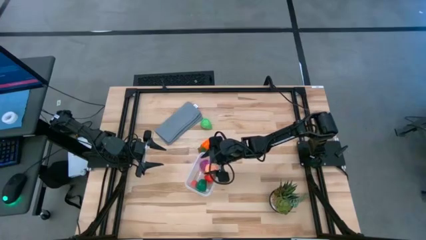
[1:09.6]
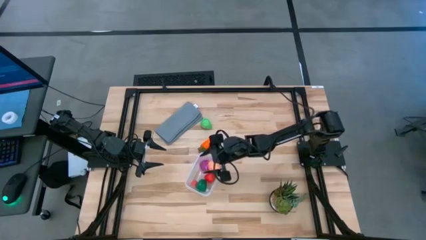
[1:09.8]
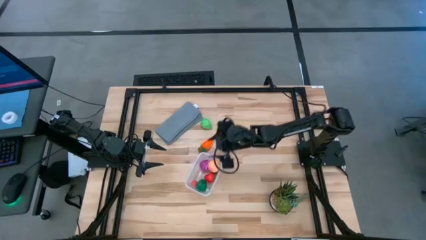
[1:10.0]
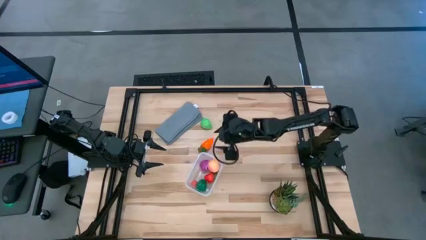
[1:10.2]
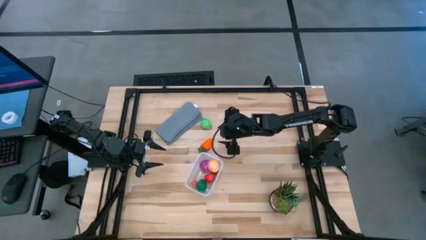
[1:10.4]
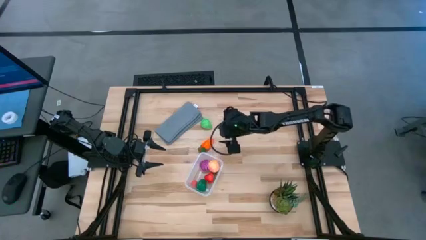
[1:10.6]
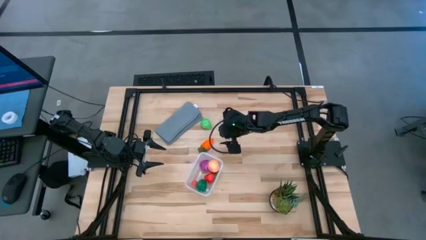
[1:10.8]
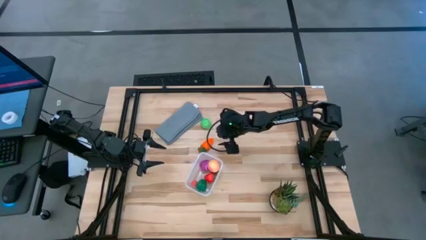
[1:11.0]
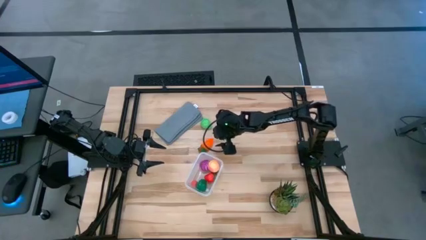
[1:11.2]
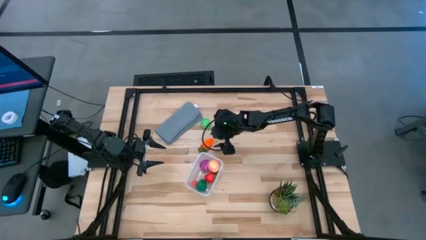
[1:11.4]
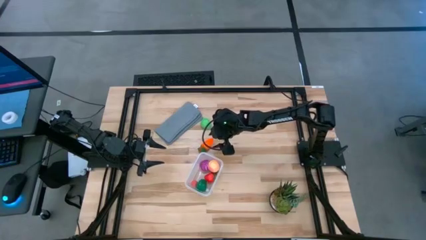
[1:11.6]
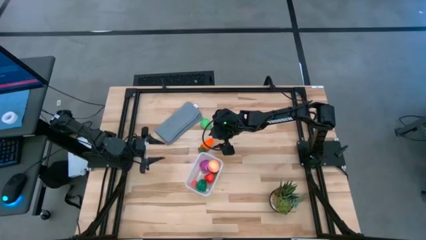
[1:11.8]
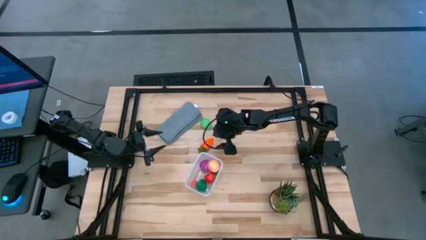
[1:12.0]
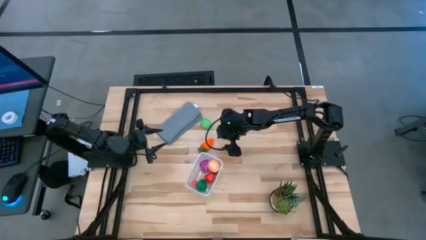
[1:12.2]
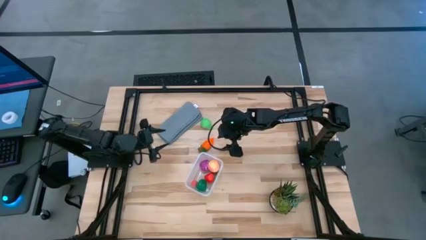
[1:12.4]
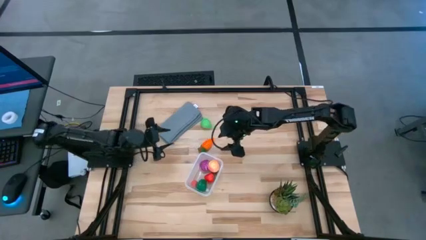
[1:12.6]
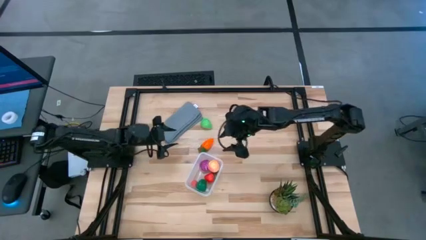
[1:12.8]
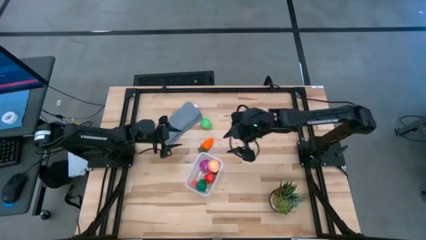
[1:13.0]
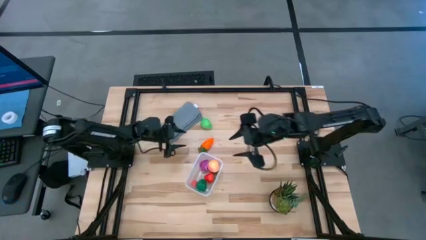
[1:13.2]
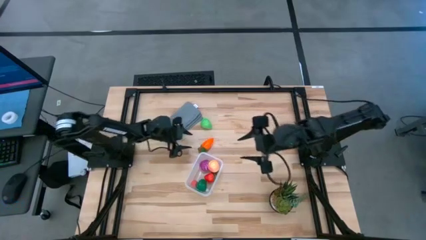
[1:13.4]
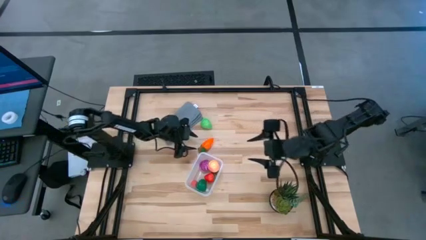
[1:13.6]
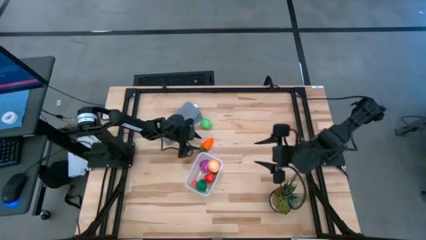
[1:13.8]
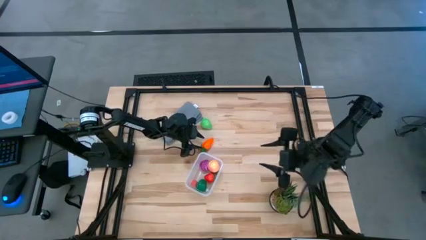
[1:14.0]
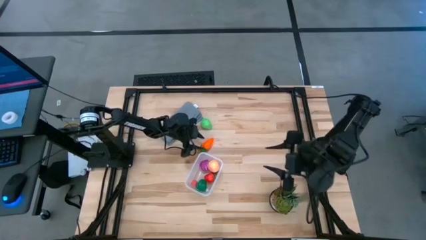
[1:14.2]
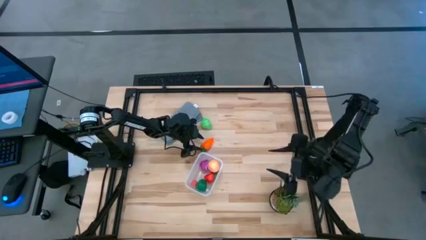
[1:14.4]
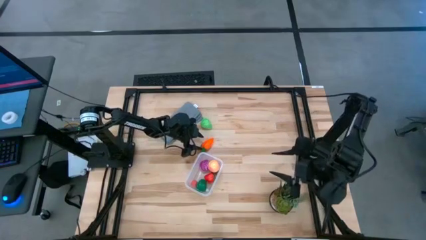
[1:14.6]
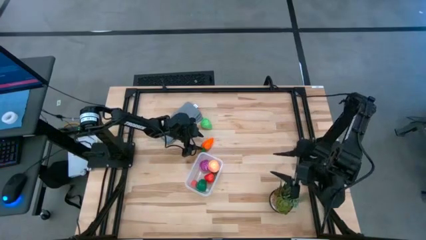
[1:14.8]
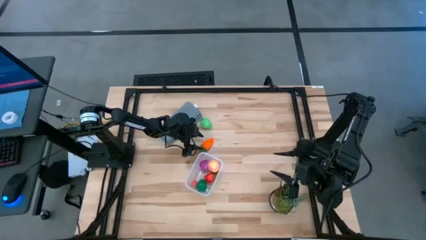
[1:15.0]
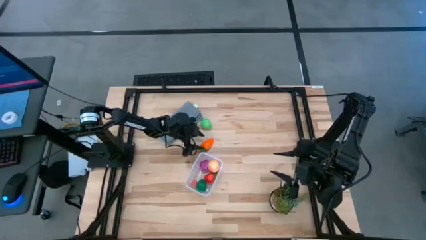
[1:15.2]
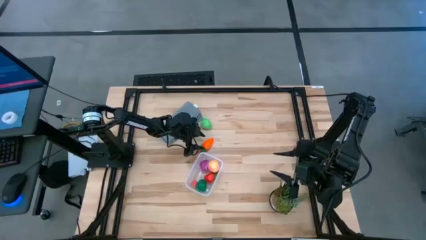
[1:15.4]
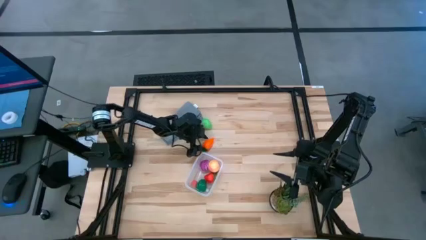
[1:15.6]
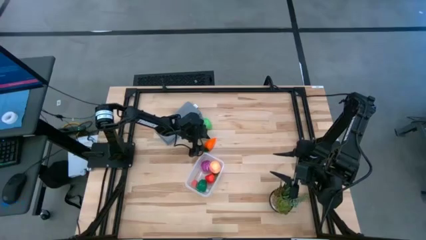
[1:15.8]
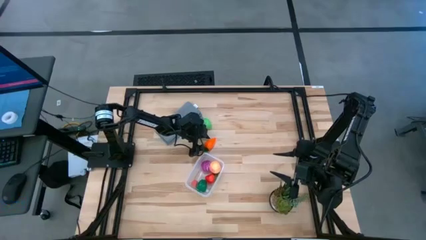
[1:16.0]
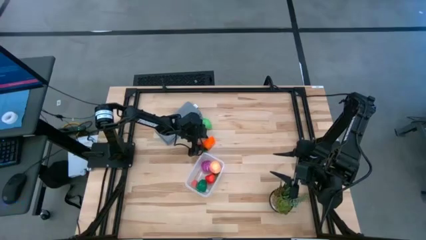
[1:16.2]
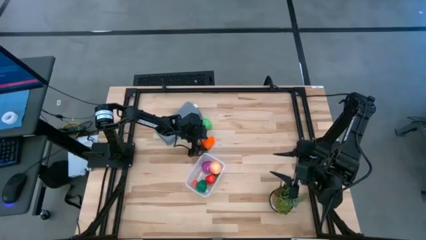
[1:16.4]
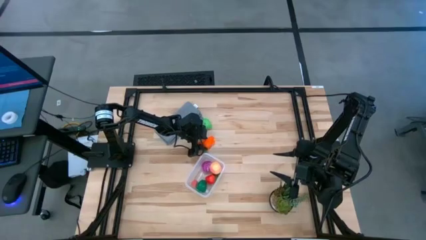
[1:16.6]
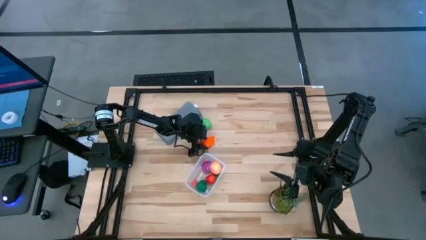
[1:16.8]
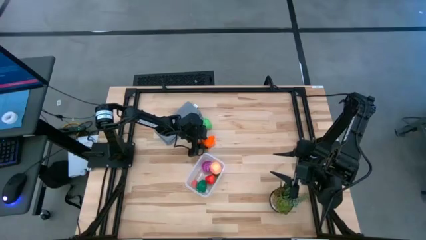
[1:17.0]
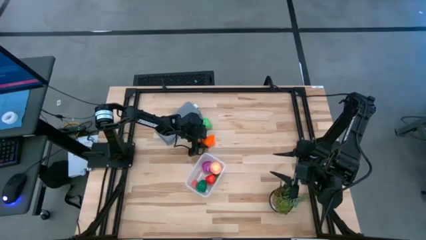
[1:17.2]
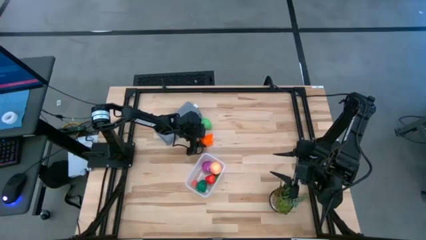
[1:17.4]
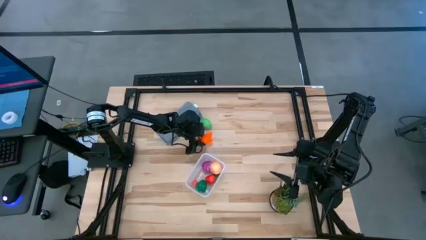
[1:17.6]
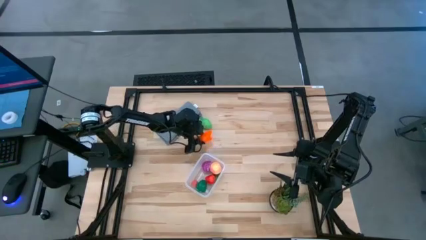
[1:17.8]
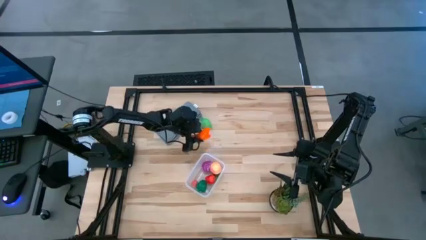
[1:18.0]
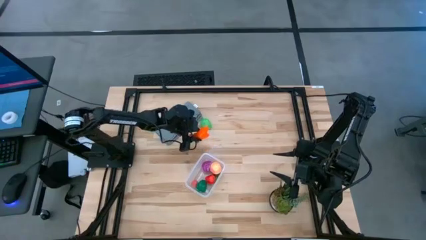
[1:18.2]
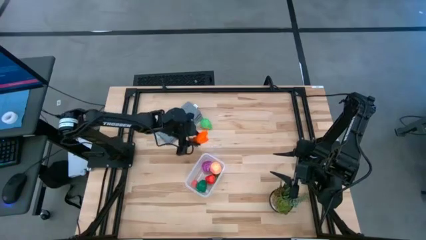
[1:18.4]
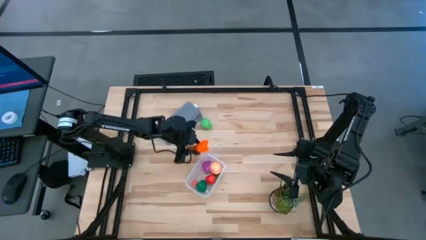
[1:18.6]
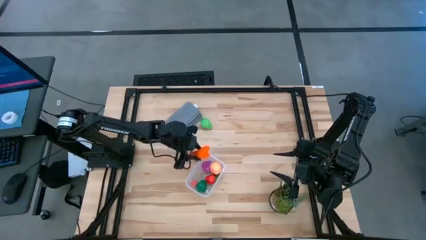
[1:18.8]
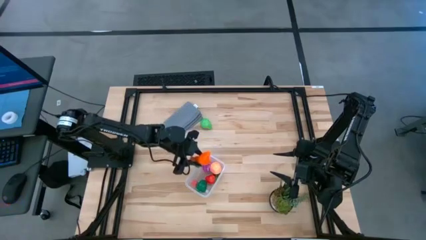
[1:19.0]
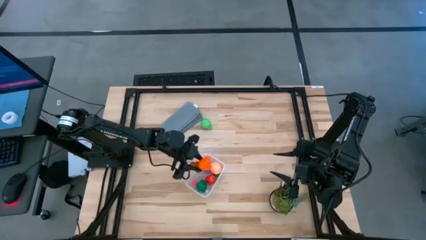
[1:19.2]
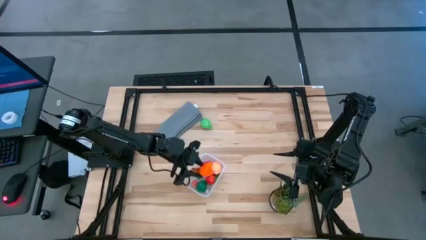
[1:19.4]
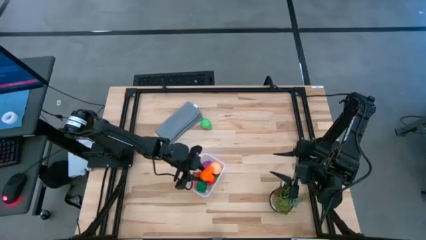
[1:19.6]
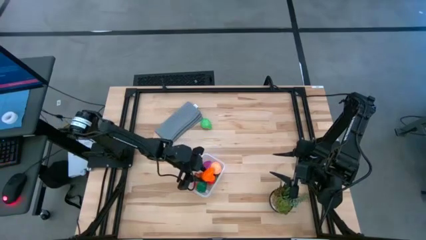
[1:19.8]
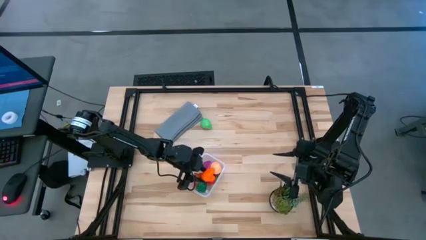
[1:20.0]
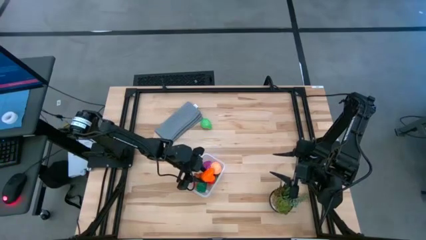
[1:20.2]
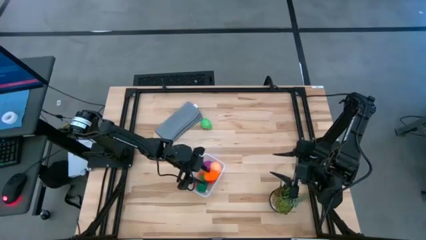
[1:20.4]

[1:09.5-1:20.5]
Task: Pick and placing Produce into tupperware
Put the orange carrot into the transparent bin

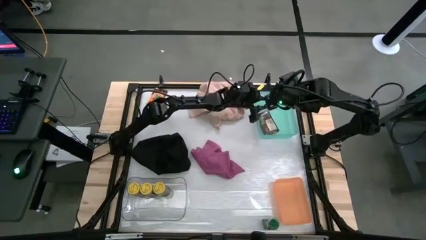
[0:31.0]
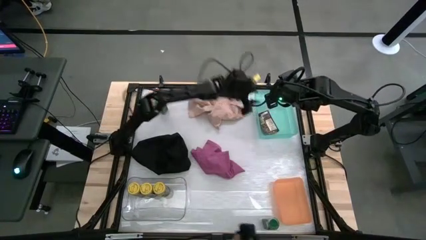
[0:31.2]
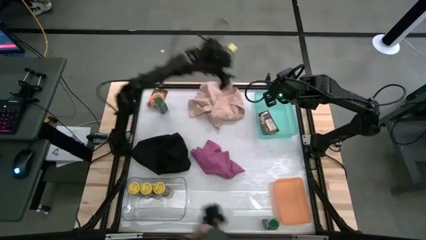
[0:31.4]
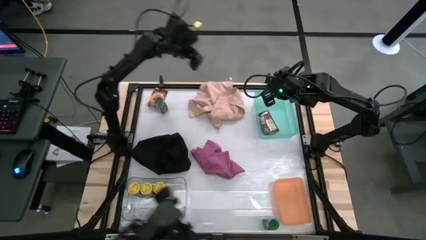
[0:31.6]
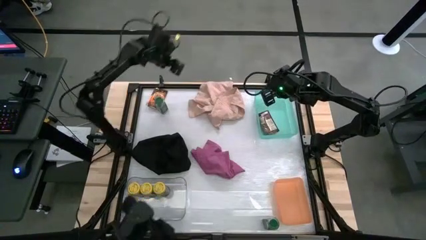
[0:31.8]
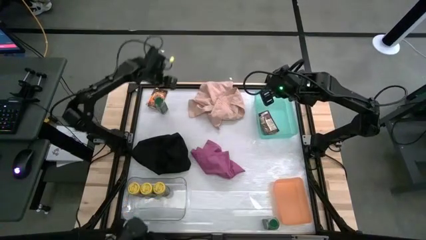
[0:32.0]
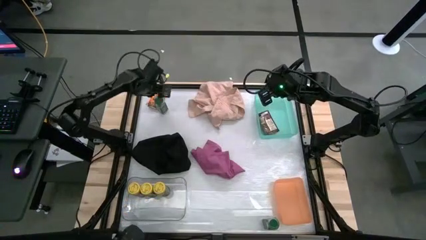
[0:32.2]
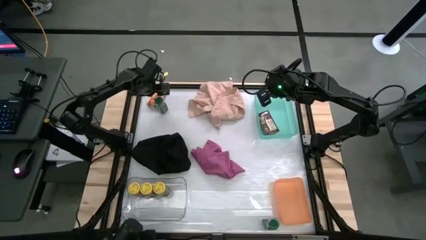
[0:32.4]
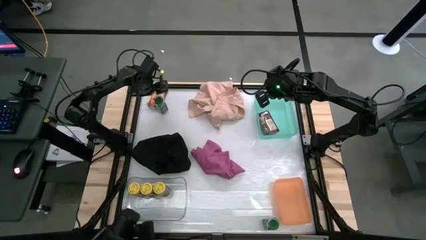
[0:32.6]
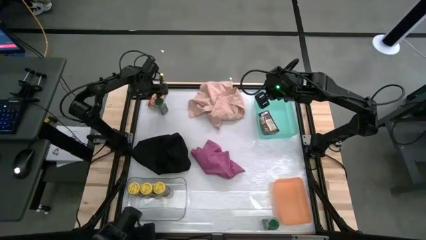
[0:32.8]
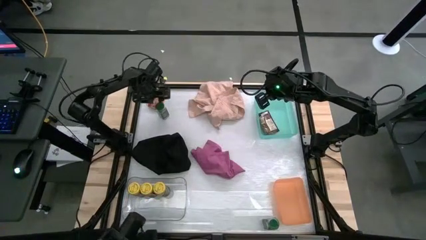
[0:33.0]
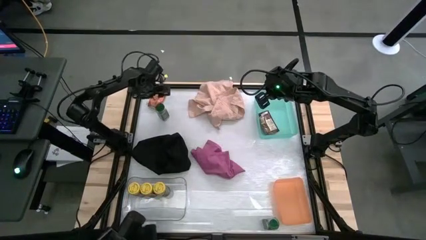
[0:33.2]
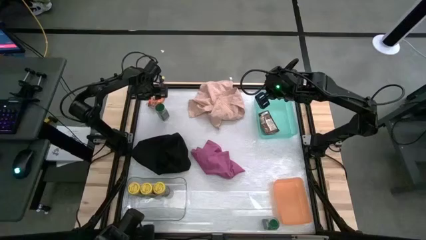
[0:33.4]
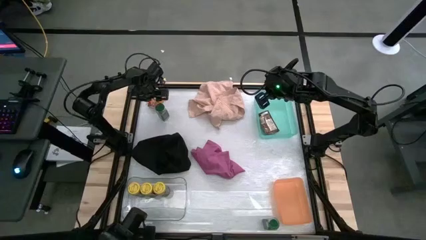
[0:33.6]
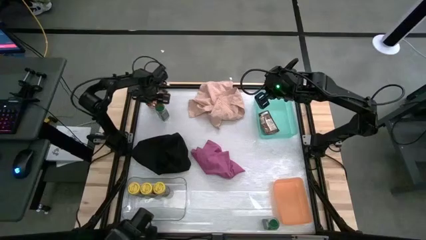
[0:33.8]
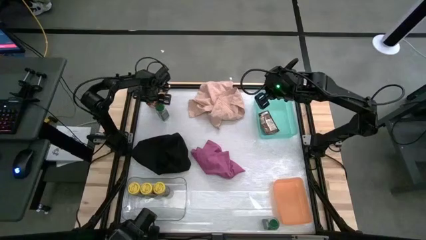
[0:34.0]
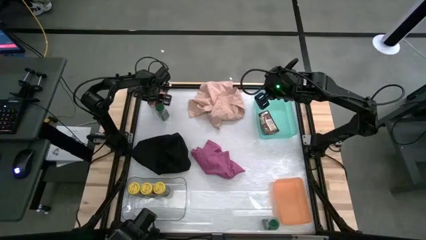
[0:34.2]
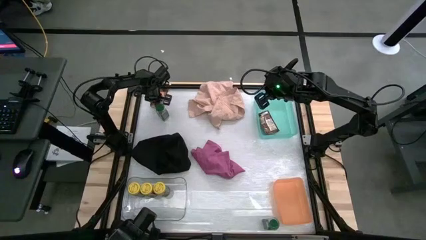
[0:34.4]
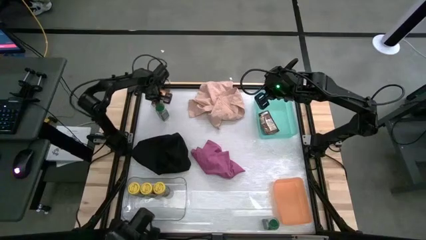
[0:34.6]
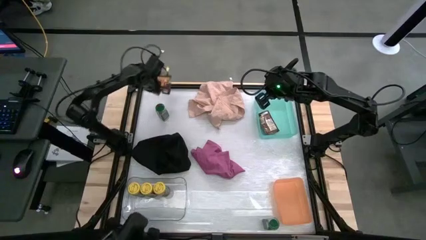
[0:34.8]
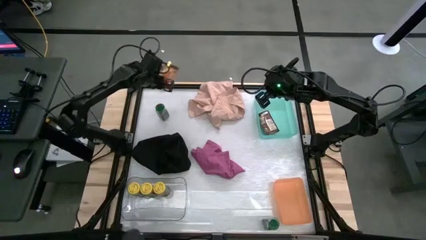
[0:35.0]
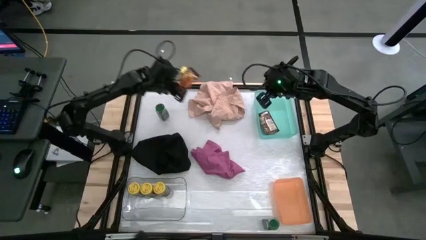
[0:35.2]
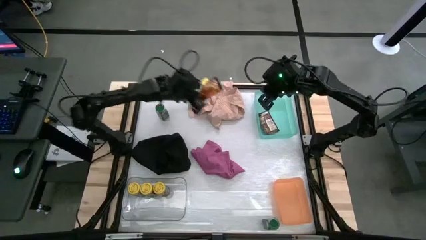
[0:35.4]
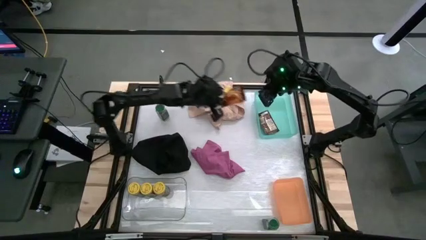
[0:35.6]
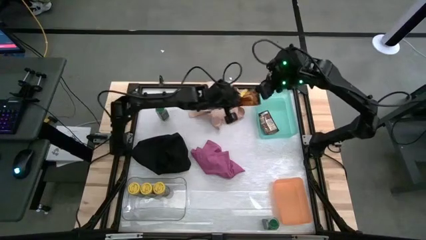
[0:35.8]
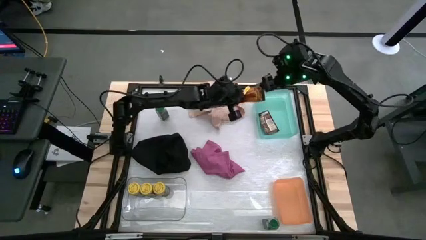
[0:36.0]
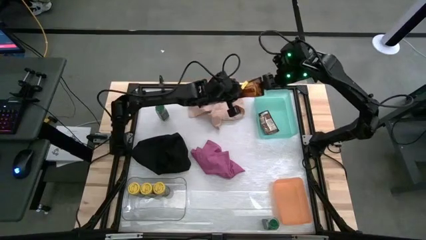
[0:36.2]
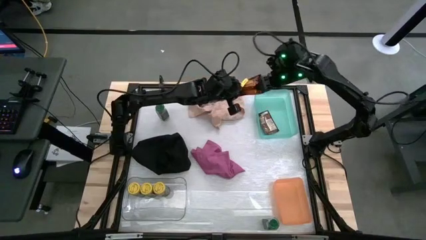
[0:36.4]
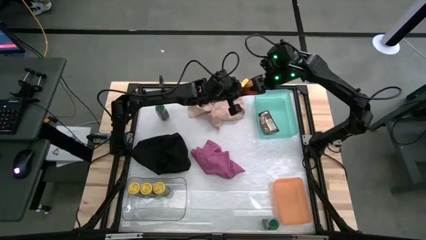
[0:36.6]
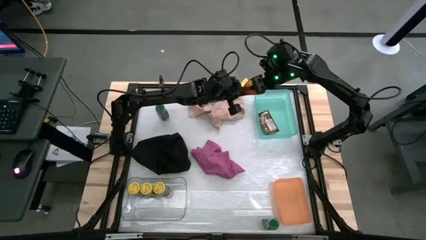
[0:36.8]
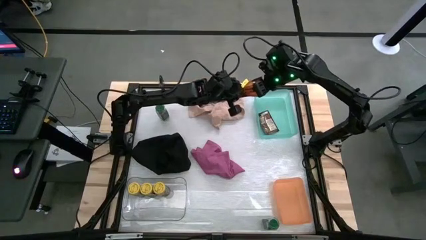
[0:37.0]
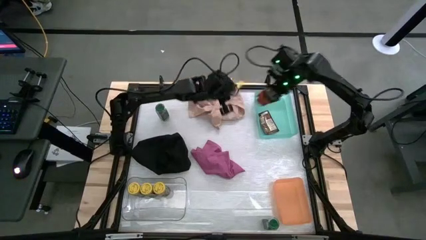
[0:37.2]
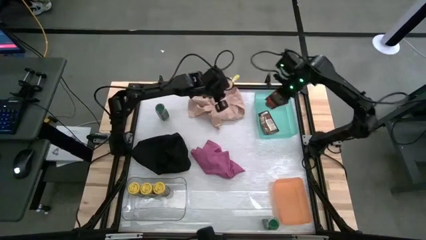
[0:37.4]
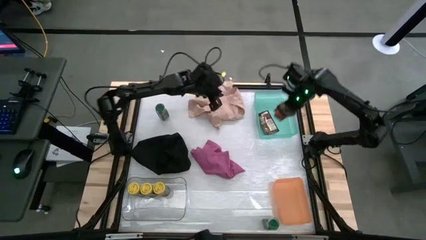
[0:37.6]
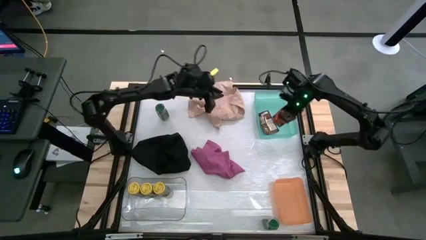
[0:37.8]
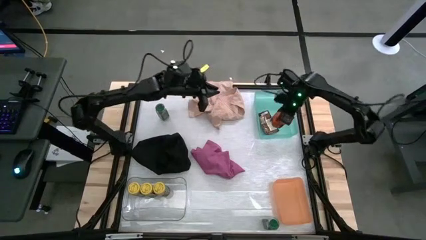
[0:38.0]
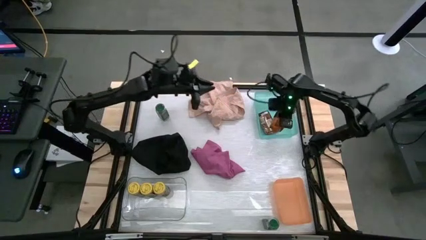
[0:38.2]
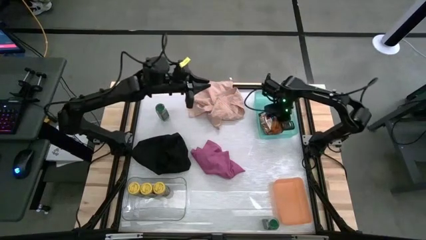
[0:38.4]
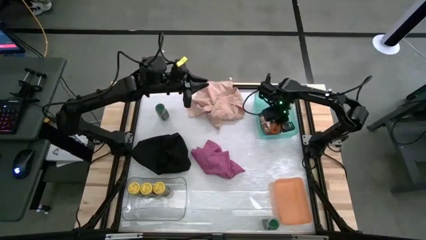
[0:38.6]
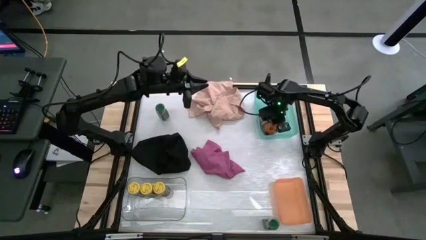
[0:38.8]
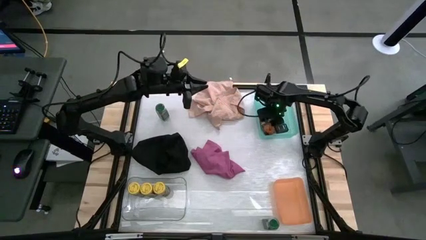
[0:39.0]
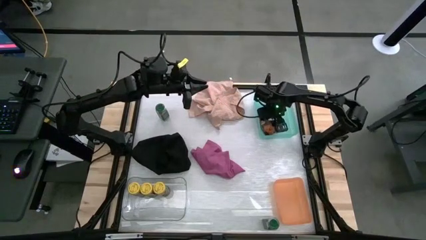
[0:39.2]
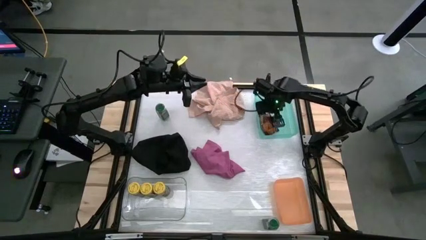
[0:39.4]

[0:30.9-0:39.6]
Task: Sort spices by type
Put the orange seasoning pack into the green bin
